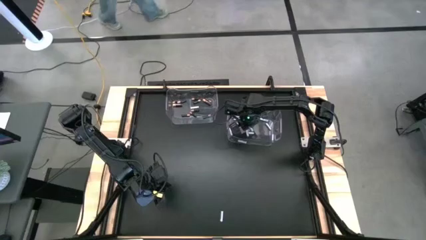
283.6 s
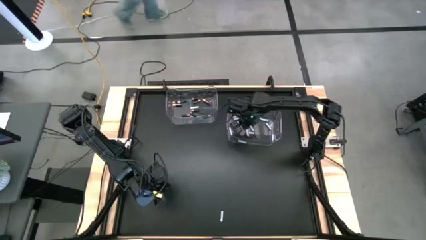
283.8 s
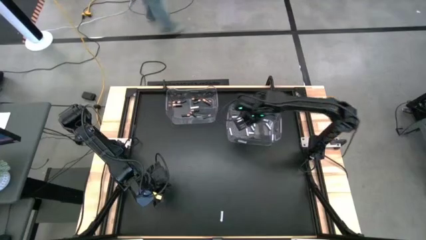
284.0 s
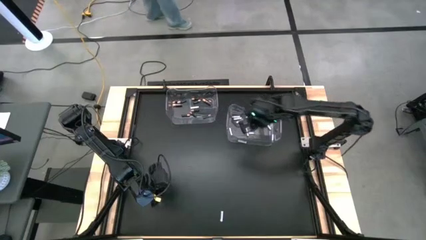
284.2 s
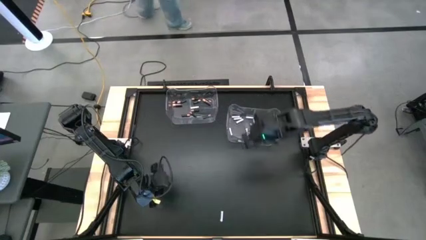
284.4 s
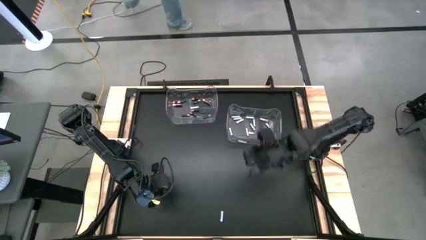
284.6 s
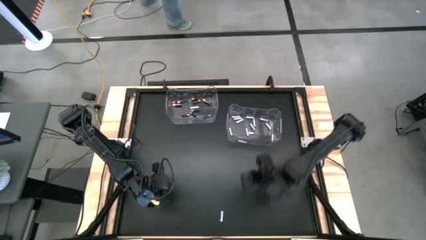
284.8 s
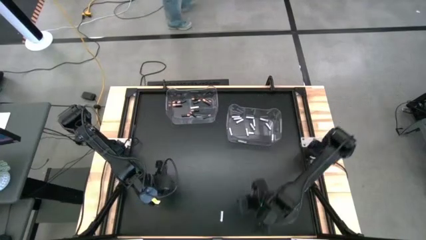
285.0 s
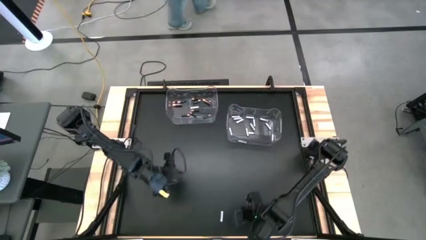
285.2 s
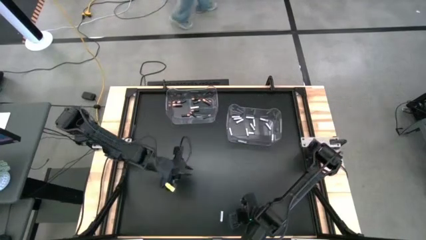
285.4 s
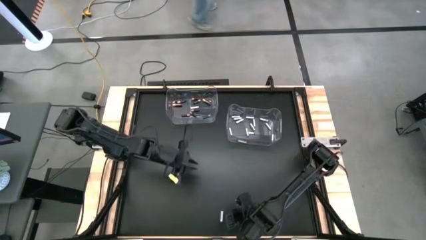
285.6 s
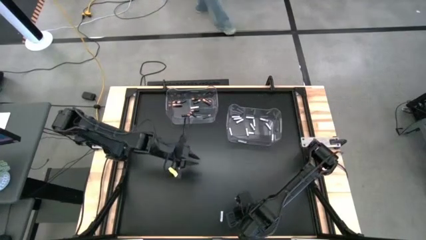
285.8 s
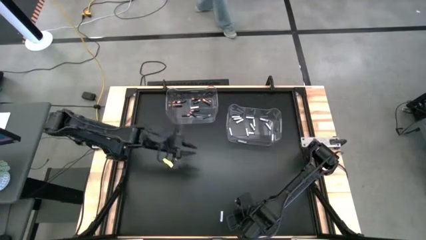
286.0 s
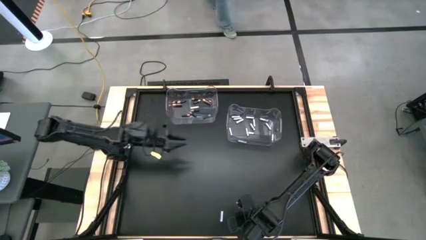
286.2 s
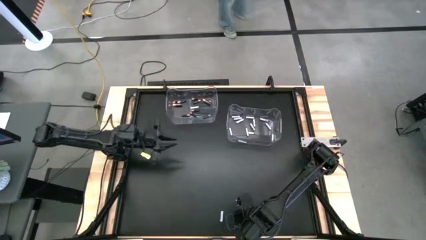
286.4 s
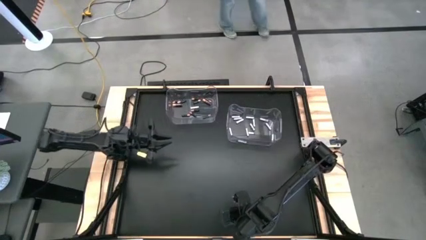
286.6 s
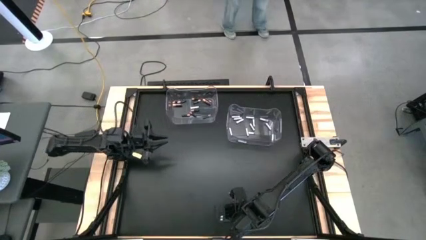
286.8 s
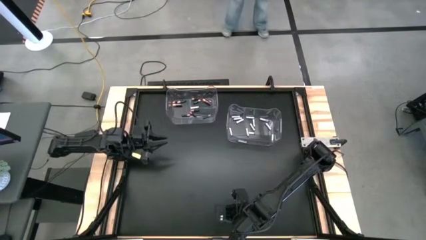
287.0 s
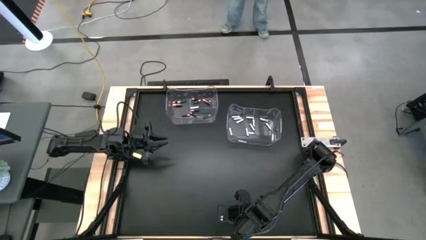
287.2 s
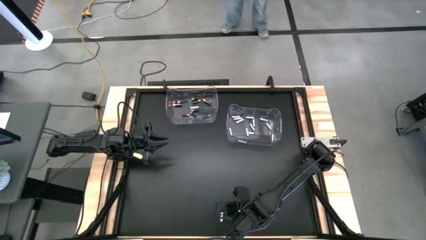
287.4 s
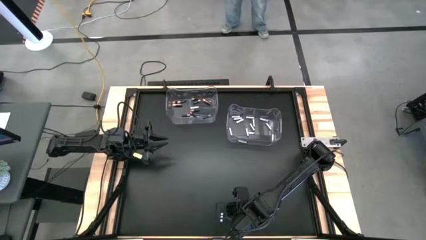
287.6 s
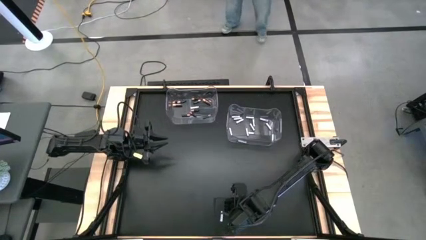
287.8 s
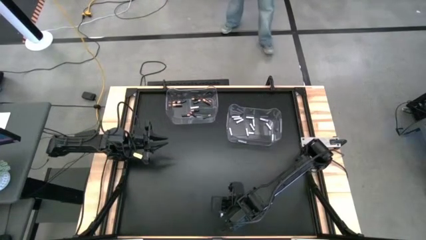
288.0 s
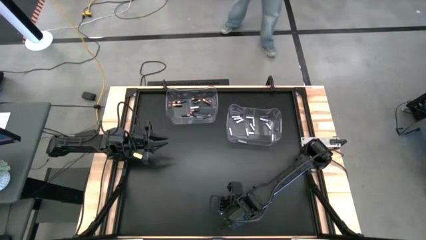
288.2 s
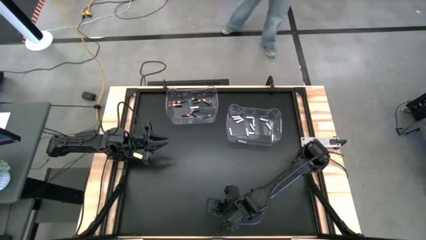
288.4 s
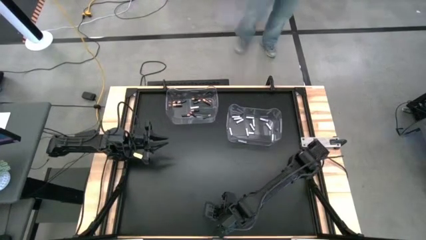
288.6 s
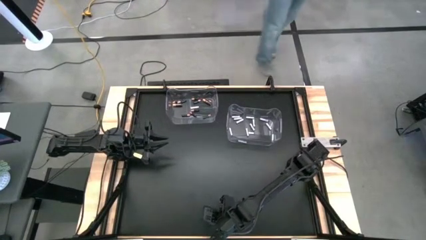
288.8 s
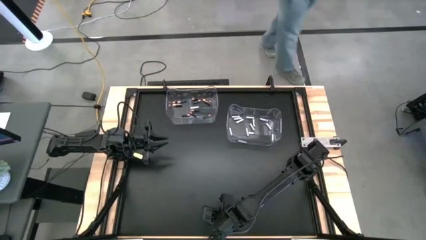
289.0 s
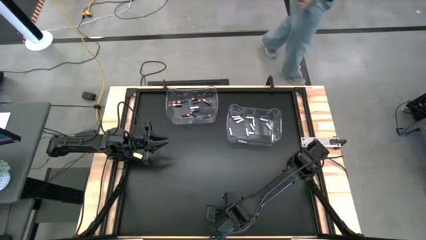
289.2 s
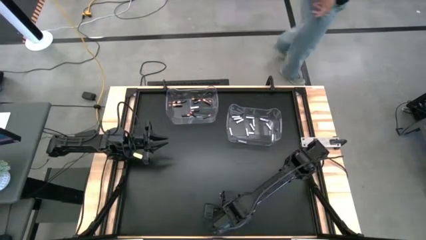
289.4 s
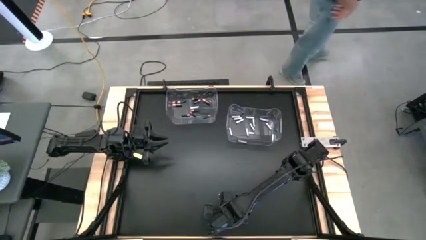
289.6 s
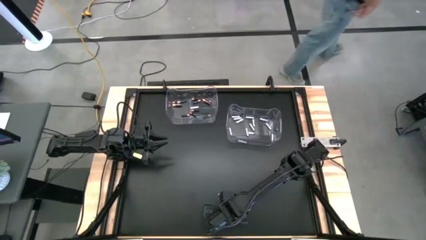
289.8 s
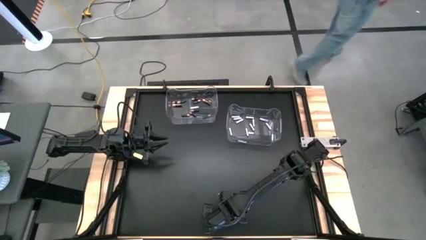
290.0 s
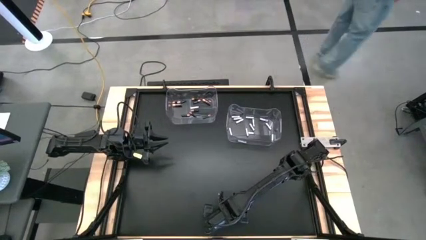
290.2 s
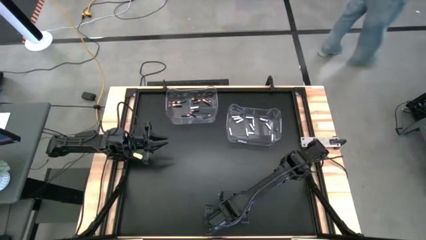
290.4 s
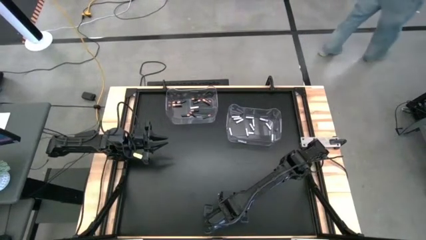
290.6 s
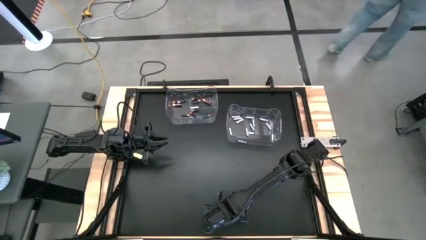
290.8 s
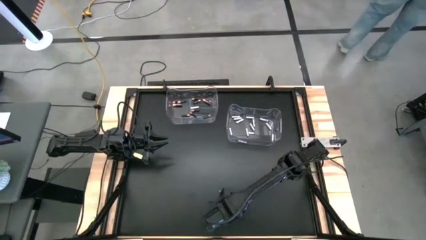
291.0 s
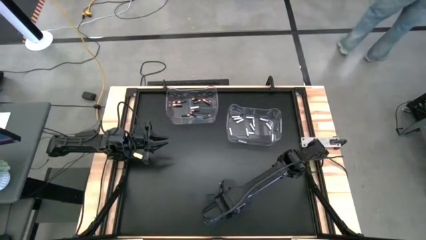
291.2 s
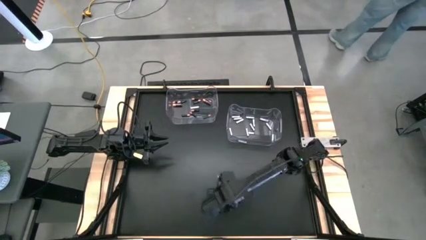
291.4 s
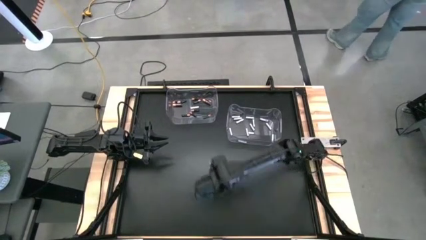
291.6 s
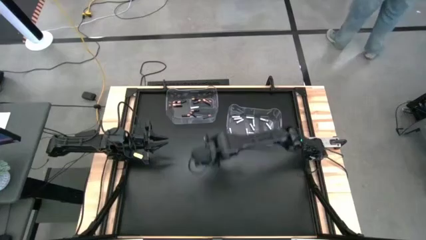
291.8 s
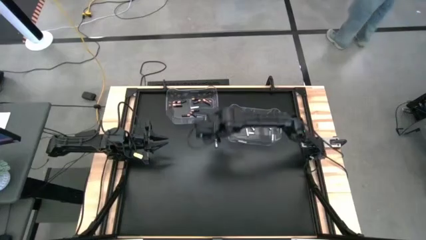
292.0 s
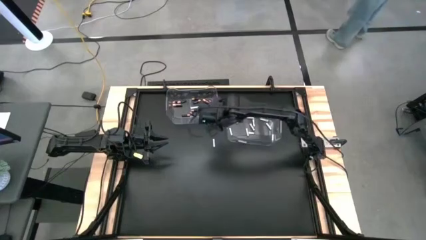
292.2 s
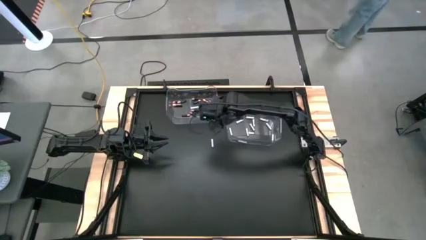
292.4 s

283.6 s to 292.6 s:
Task: Sort batteries
Put the white battery into the right transparent bin

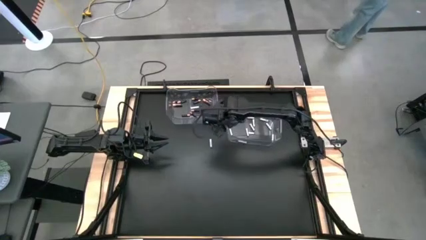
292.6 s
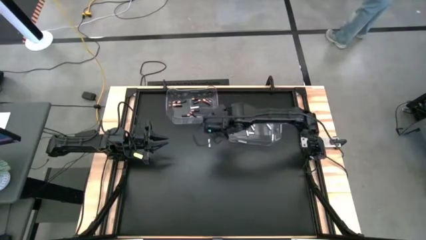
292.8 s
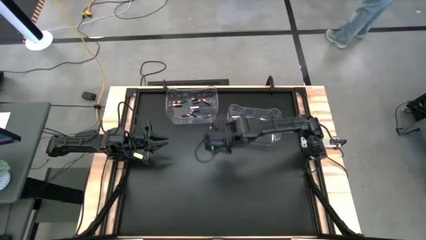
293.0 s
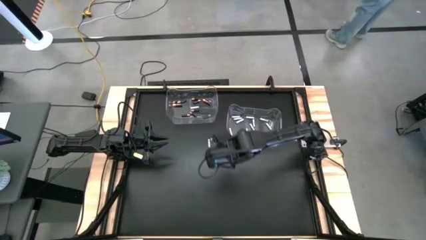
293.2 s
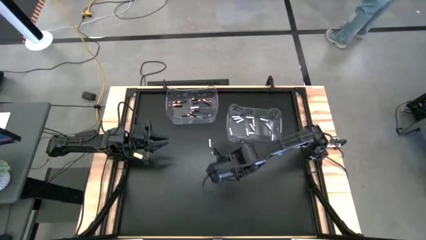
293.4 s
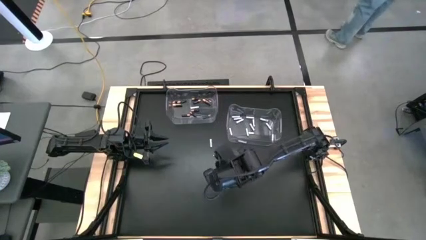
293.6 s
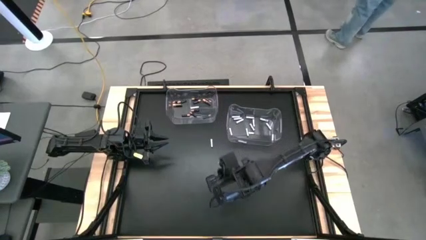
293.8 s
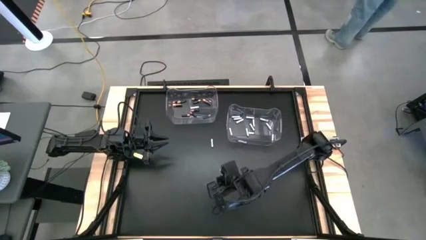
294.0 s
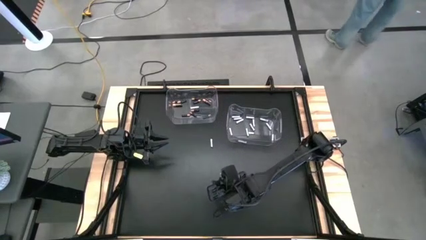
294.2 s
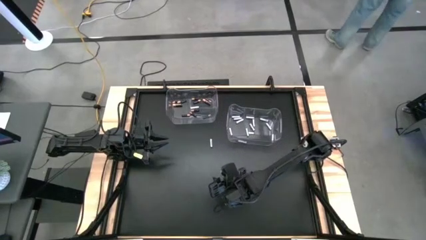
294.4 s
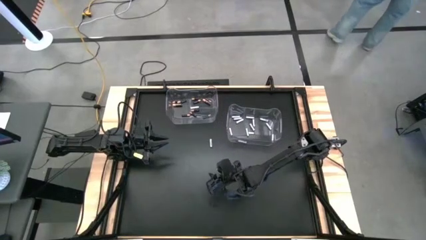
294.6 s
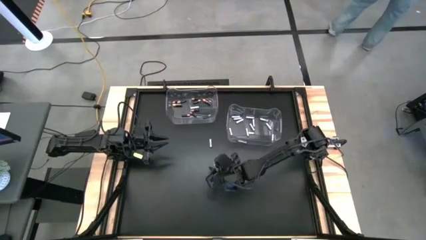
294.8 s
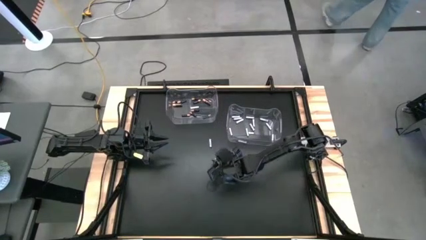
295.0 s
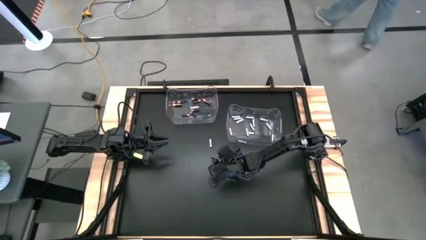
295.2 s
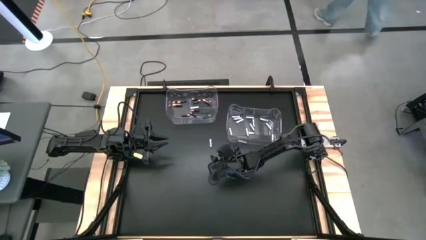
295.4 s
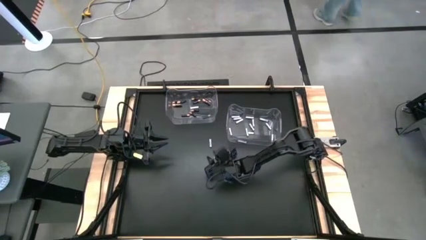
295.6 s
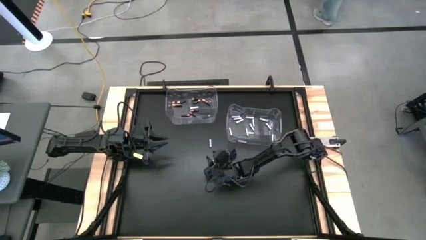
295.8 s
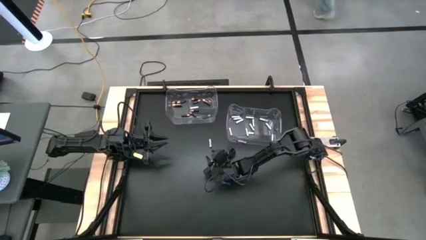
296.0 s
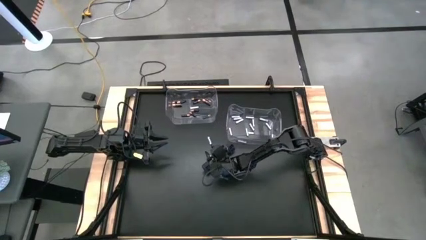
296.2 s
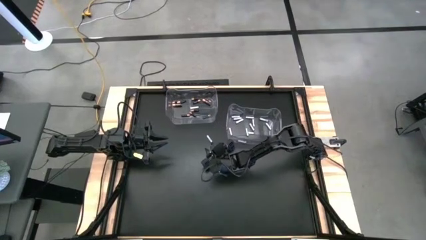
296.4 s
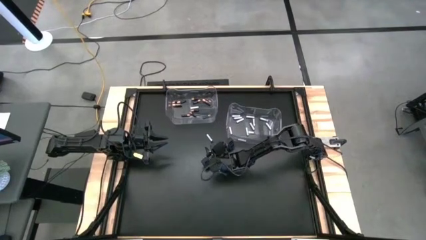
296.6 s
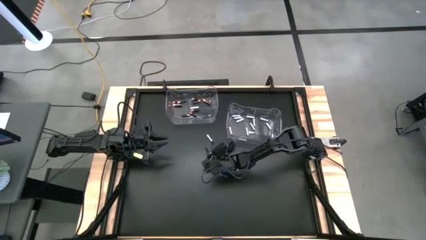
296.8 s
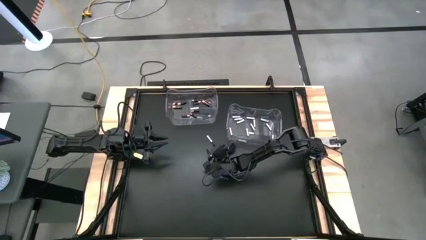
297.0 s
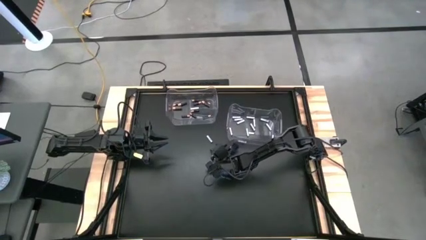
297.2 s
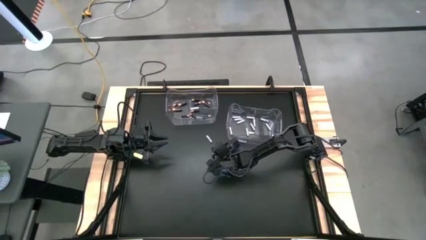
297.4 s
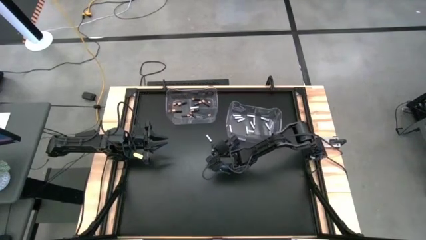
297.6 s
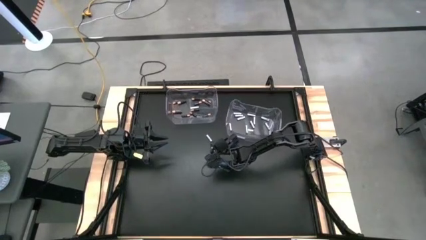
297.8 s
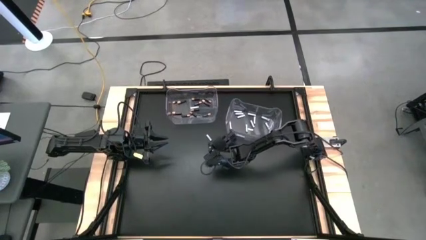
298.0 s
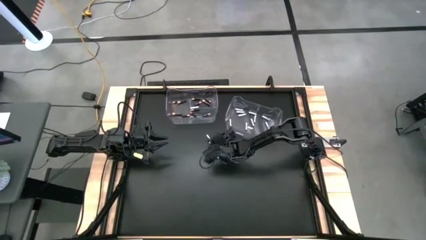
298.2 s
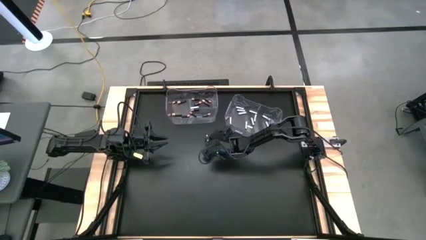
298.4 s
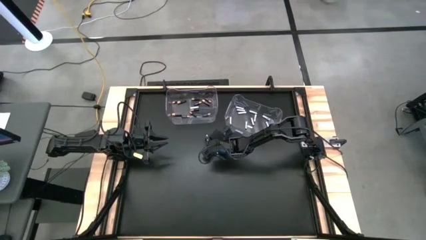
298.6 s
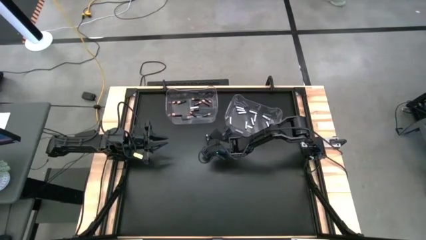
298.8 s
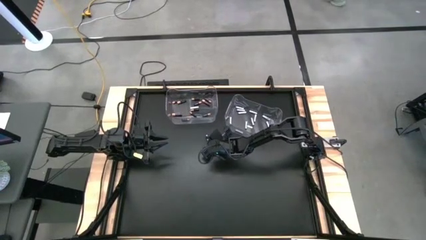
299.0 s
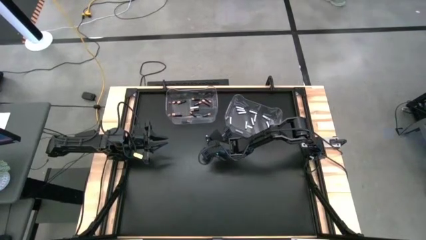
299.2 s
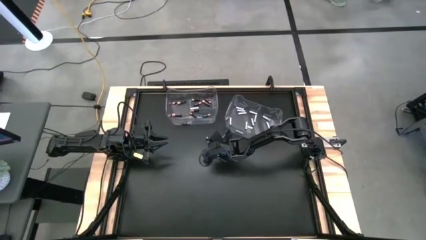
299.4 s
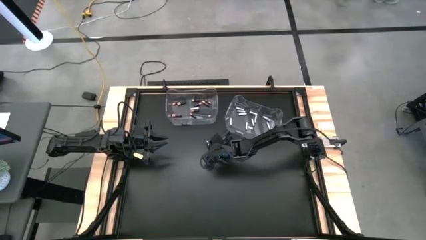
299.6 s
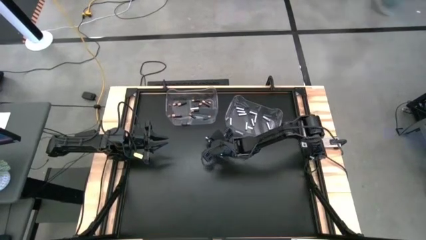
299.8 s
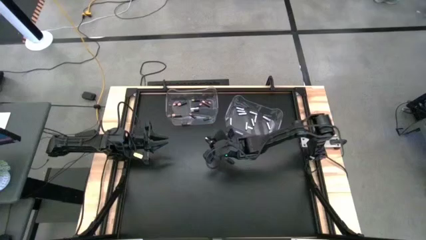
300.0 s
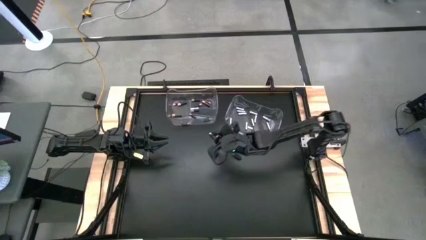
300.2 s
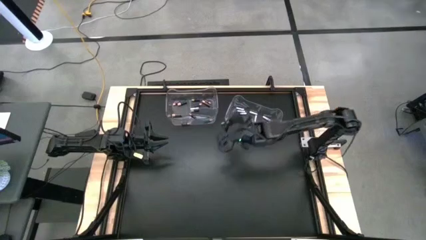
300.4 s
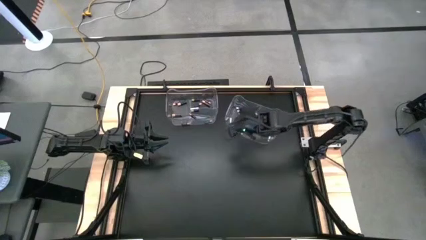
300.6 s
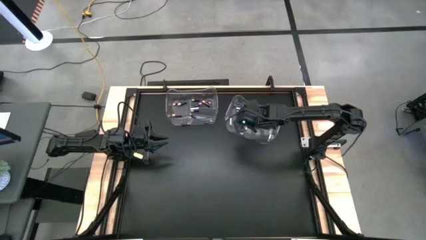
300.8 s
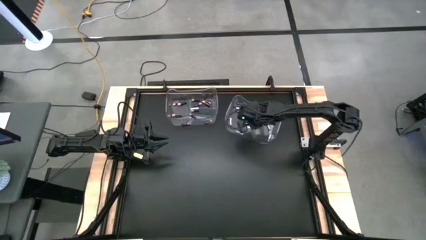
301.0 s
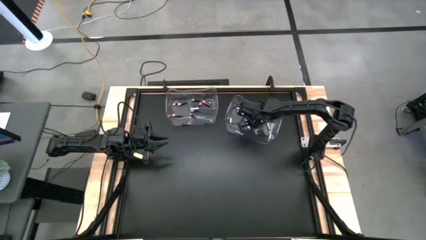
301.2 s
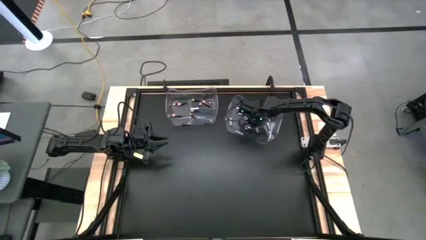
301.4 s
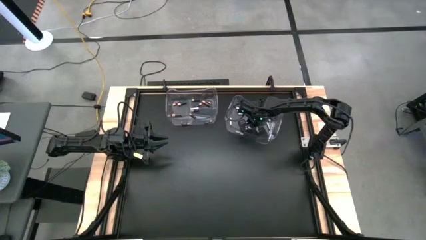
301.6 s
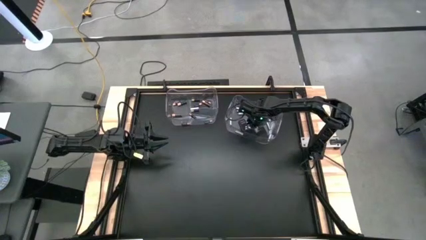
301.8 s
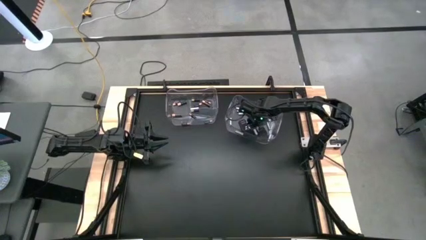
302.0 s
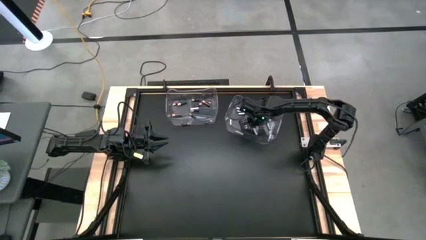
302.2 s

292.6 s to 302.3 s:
Put the white battery into the right transparent bin
